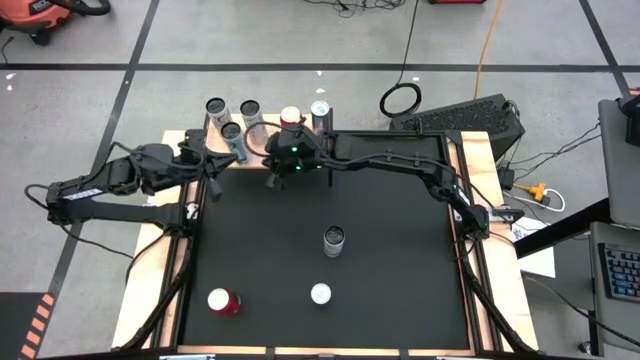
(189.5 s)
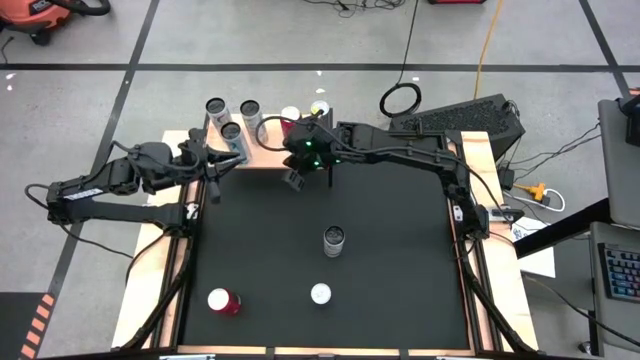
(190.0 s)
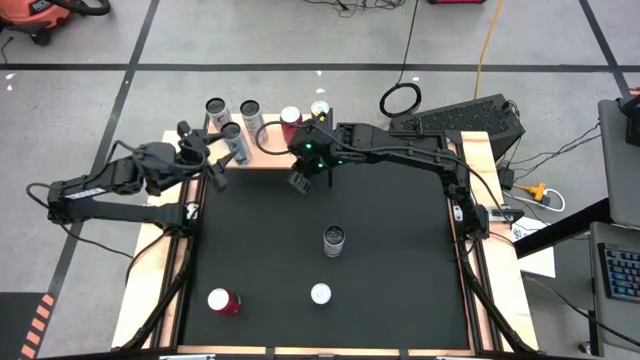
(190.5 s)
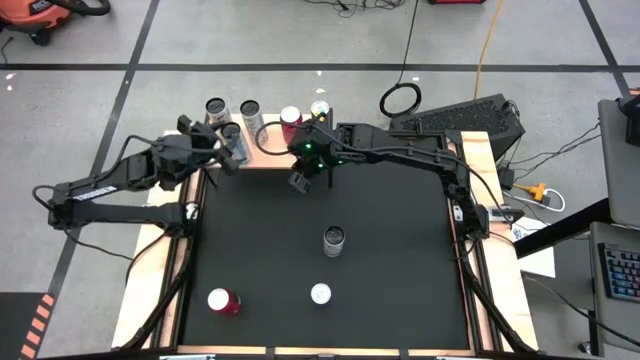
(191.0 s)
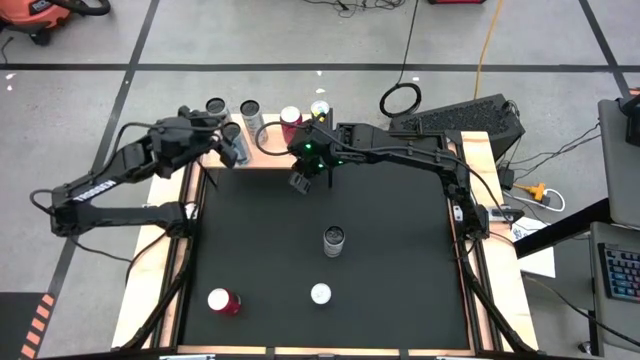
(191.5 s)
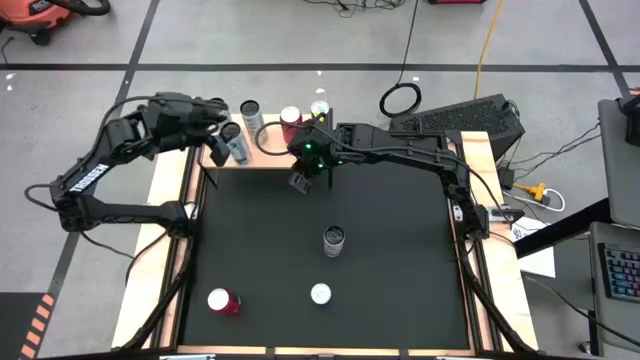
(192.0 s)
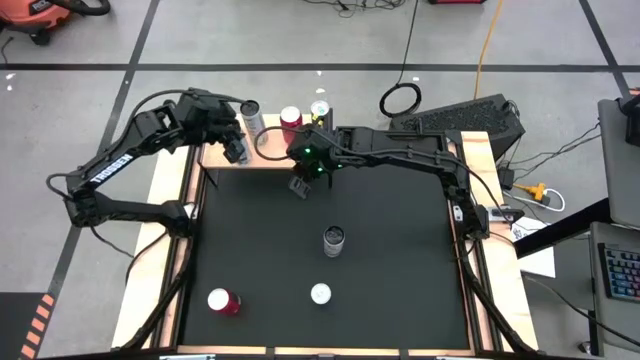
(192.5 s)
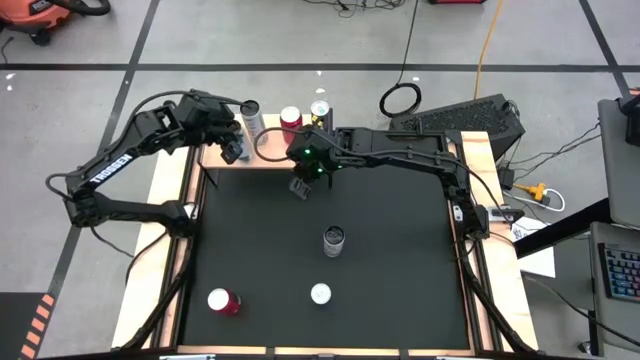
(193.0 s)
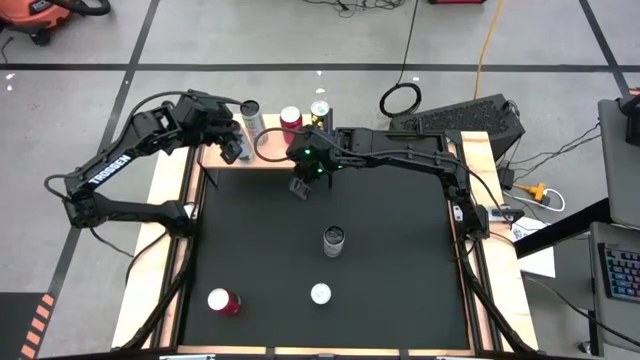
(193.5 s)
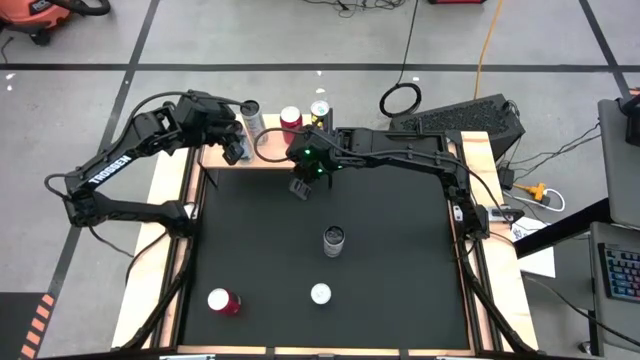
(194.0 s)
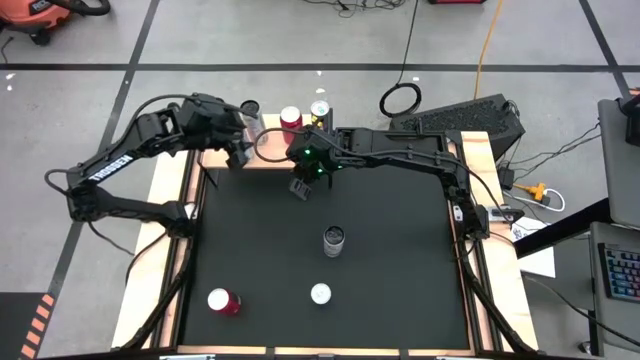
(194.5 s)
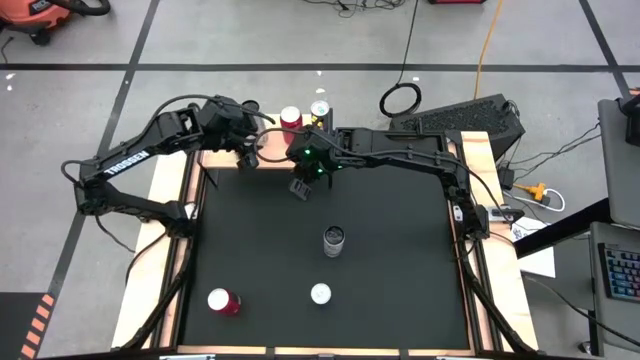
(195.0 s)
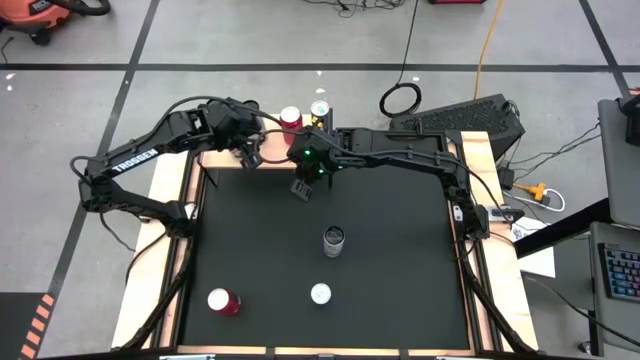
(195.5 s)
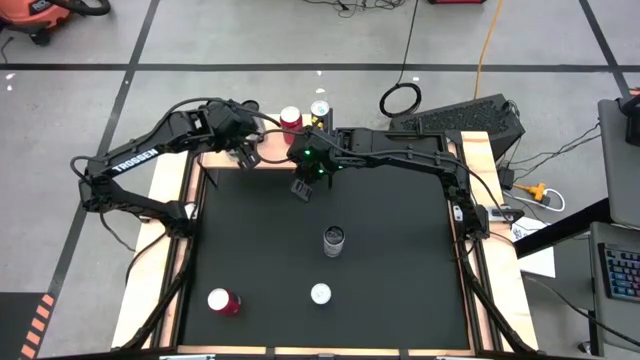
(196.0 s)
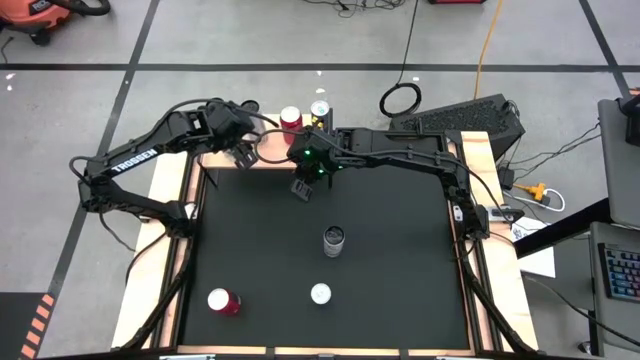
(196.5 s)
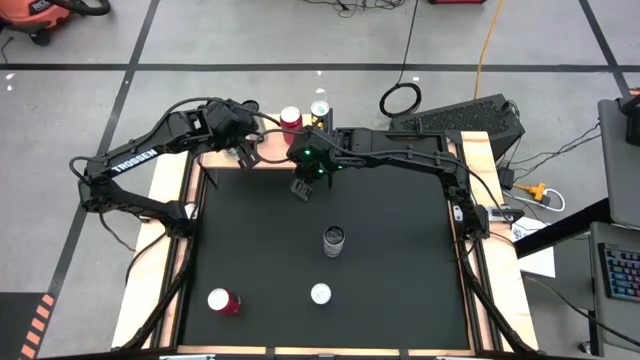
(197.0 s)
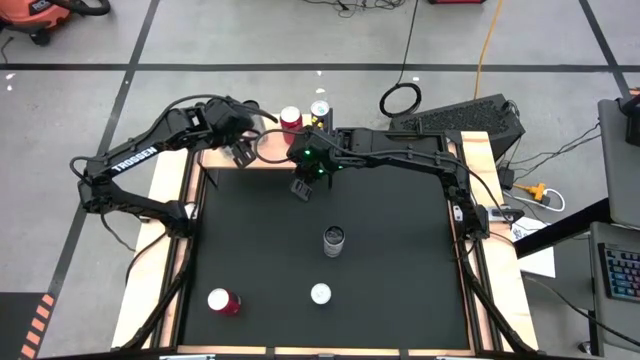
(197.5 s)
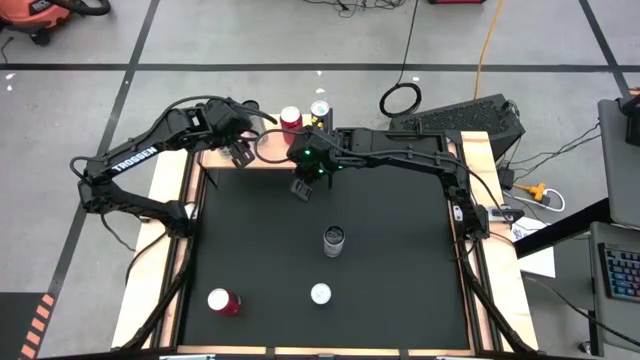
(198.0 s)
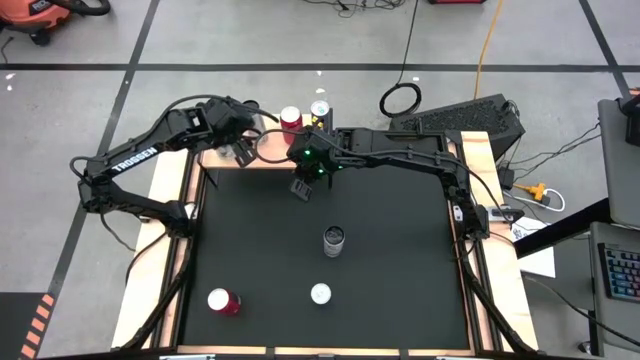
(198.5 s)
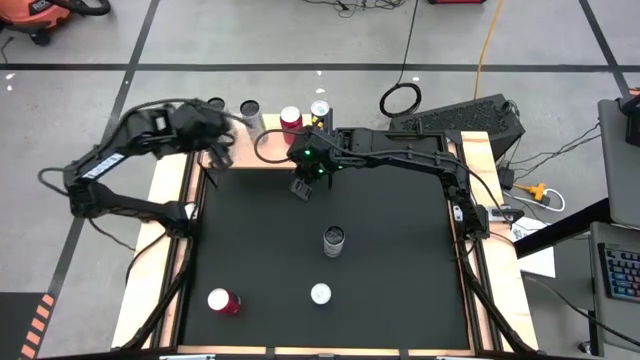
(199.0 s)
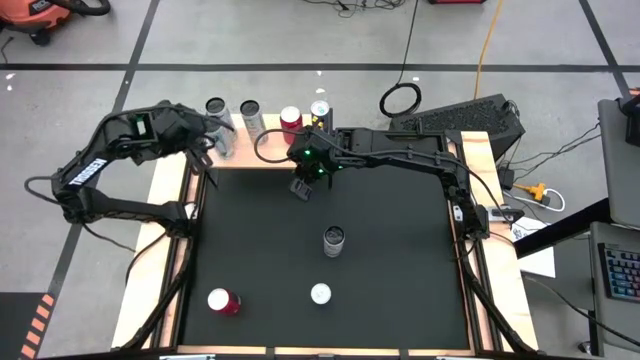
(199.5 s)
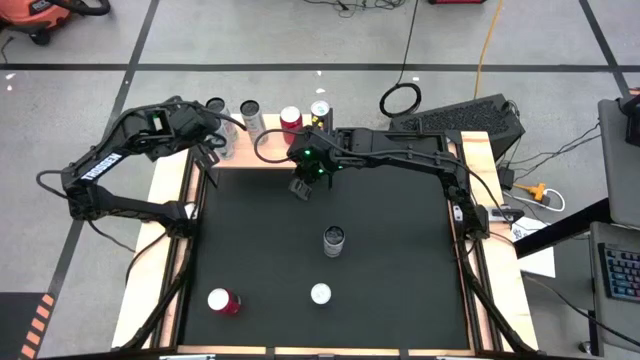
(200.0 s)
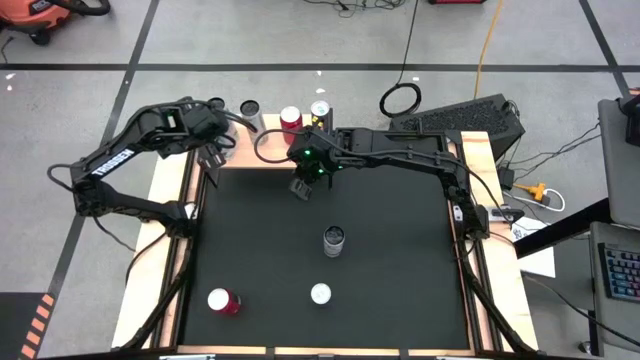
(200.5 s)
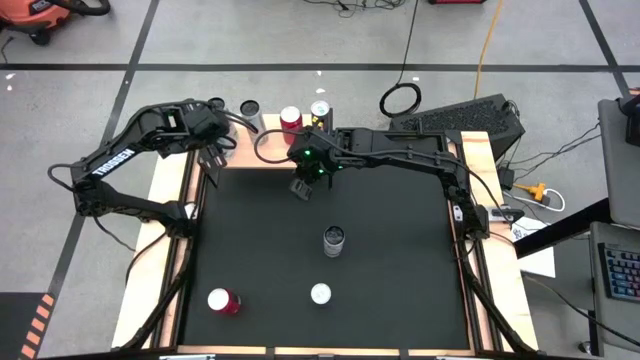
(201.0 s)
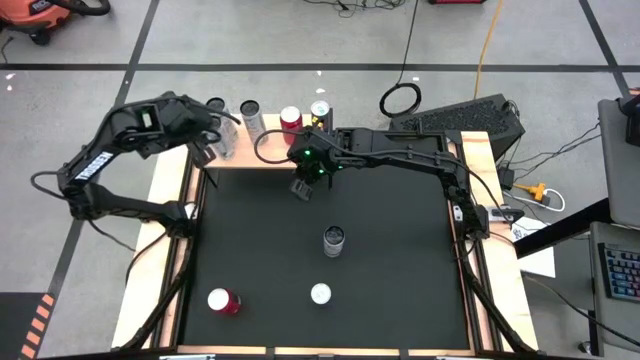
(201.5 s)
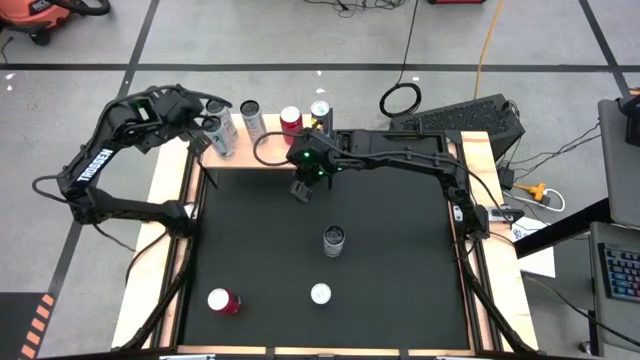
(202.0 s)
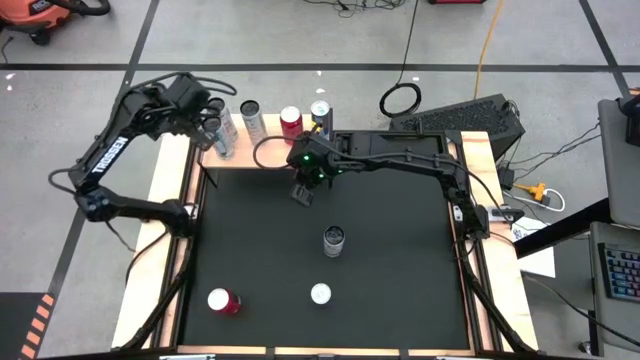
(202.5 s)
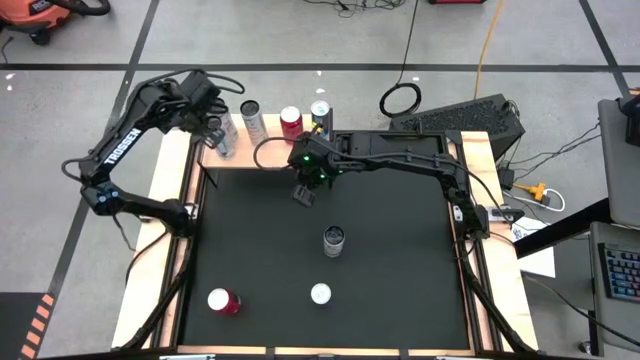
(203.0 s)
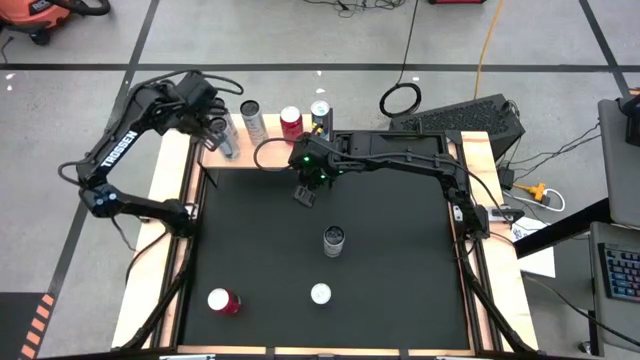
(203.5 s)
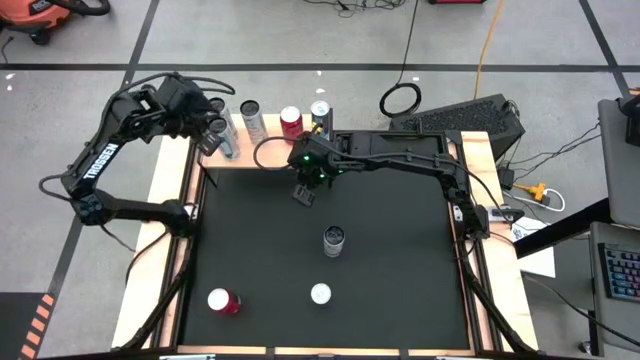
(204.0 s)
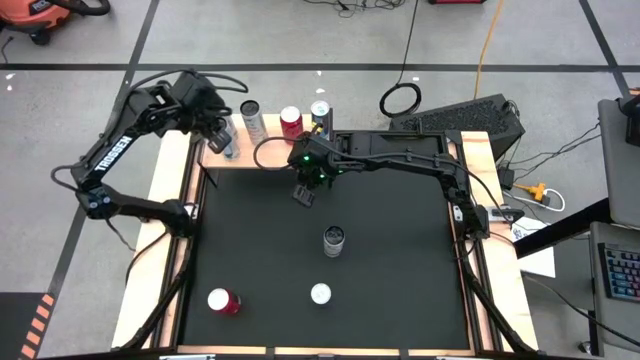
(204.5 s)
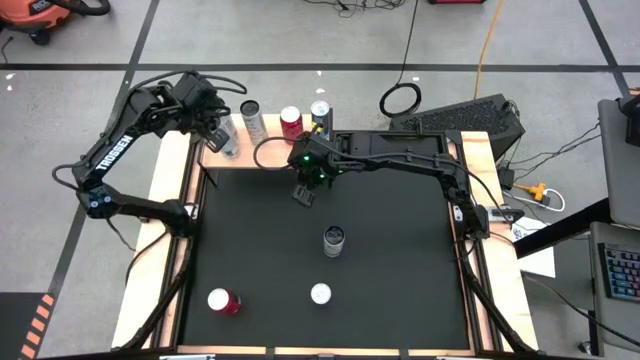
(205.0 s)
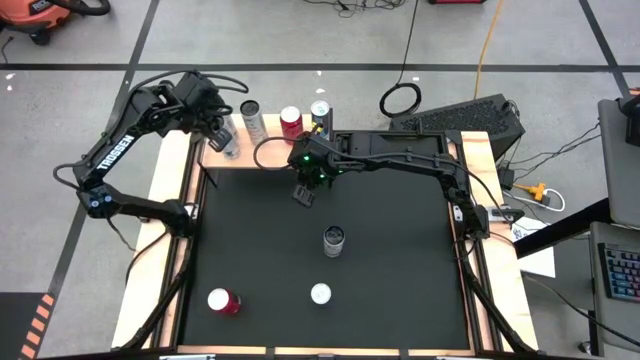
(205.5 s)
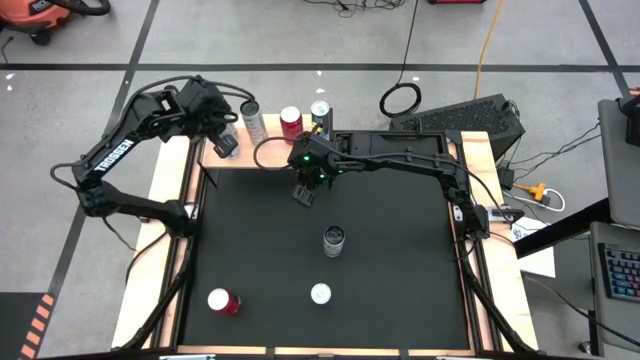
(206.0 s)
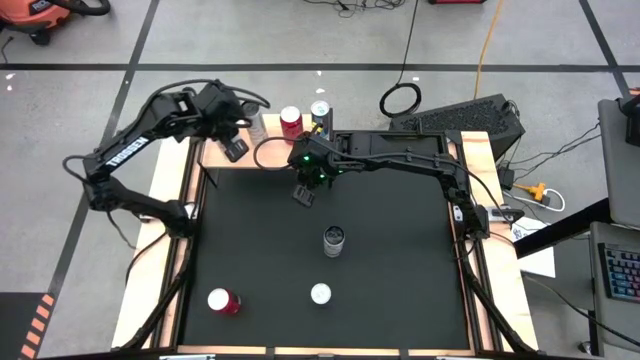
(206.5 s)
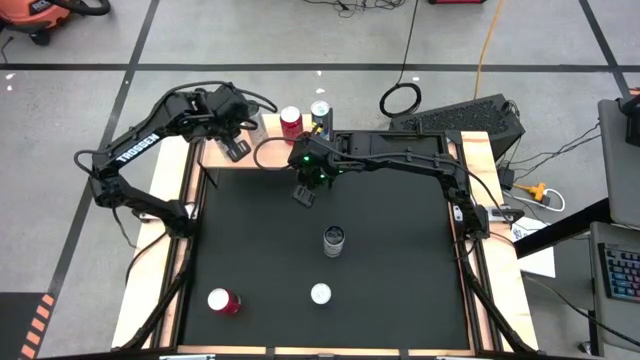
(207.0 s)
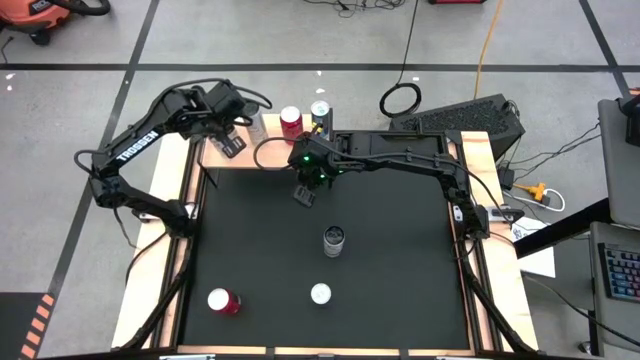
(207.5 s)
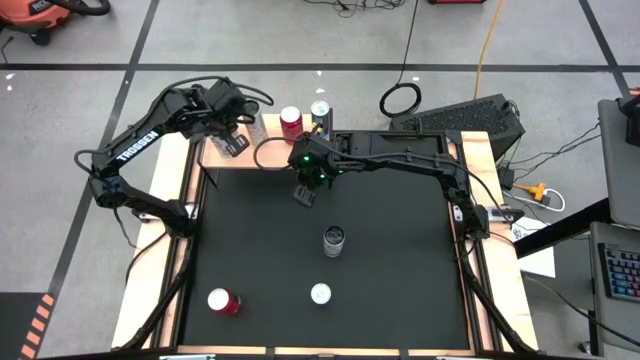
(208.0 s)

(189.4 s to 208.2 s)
Task: Place canned beverage on shelf
Adjust the white pink soda can on the shelf

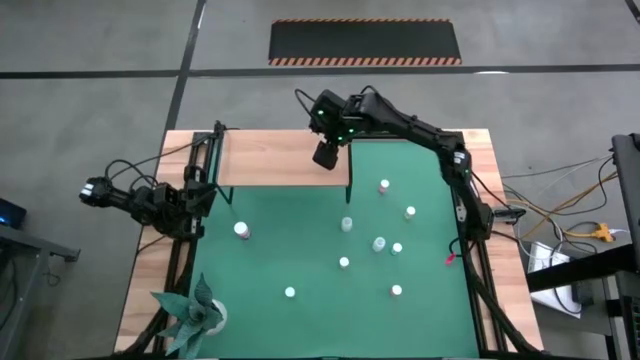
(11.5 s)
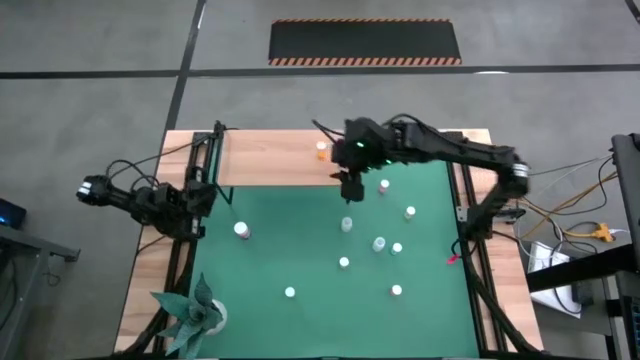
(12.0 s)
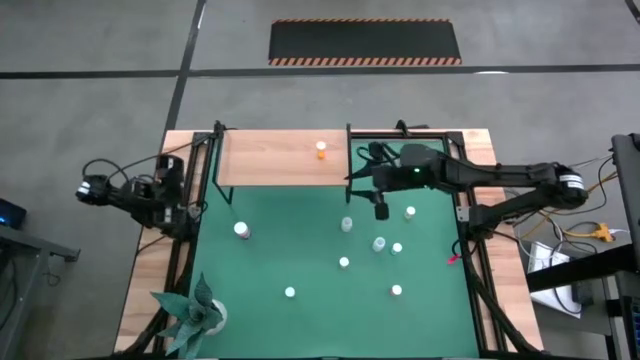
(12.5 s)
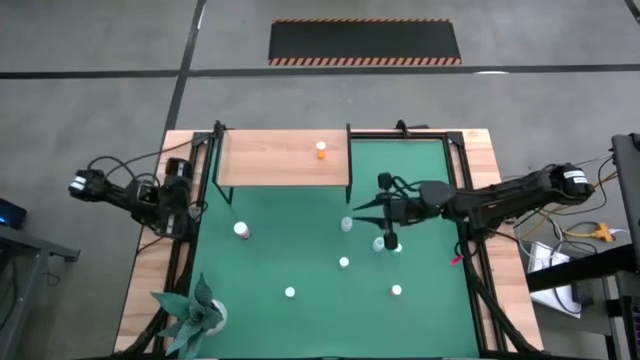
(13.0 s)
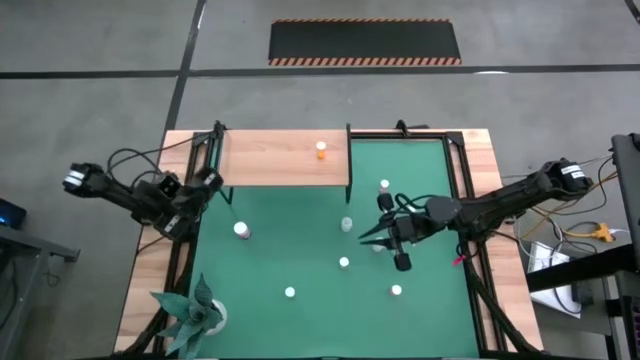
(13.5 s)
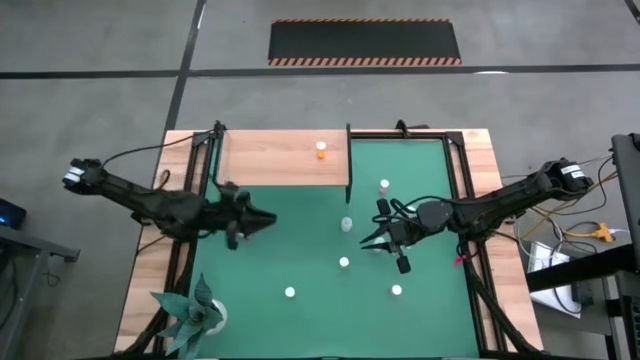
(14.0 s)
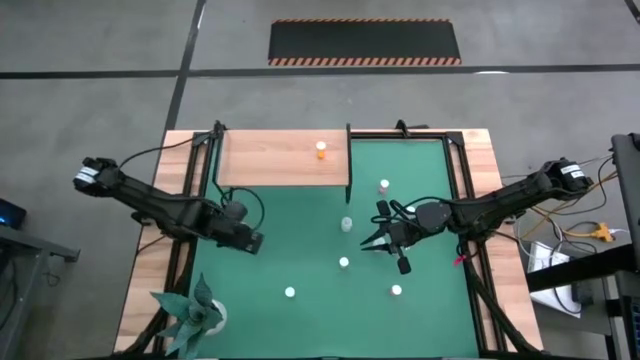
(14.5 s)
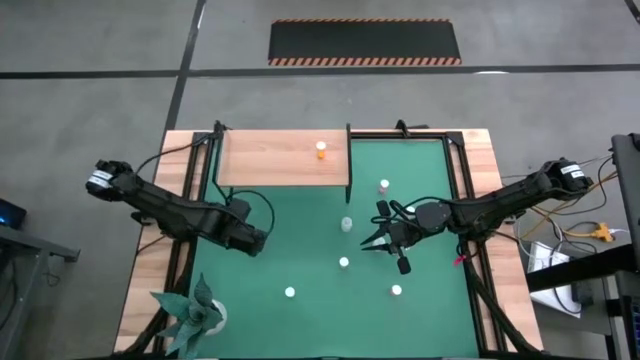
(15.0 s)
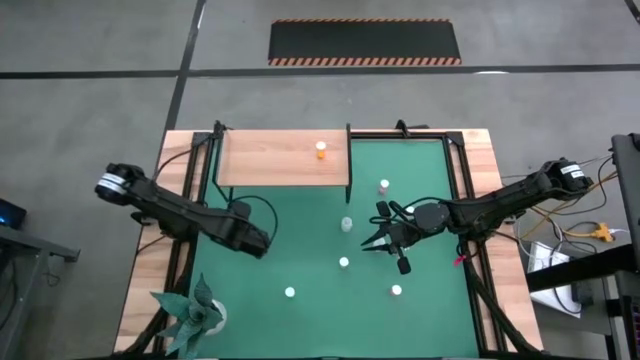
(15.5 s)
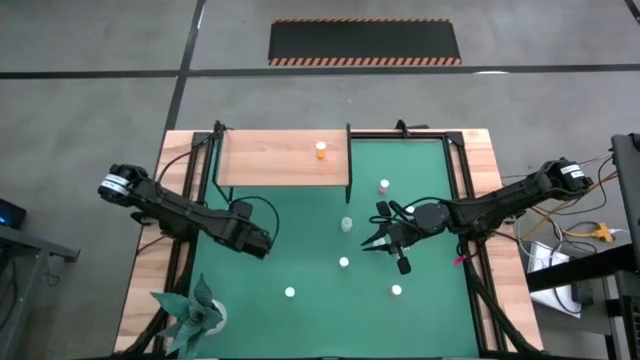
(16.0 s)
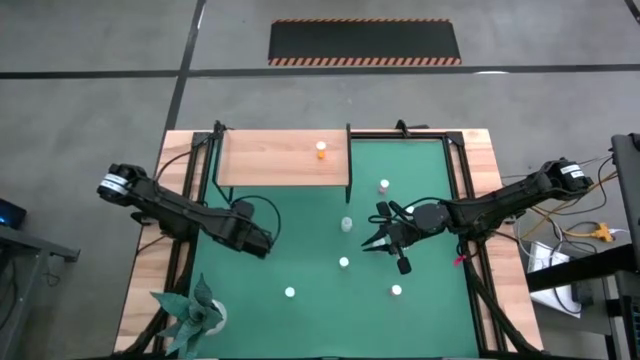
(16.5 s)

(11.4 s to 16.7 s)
Task: Pick and place medicine bottles onto shelf by color
Put the big pink pill bottle on the shelf
